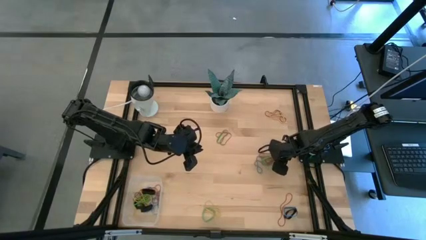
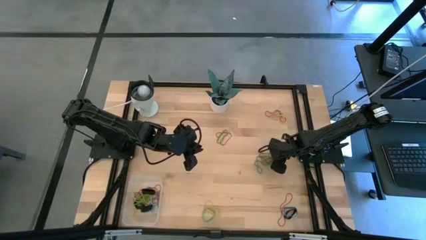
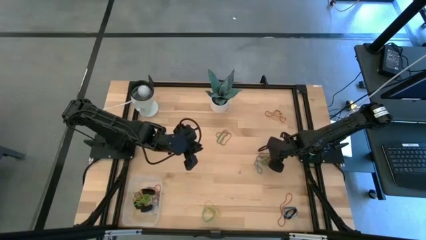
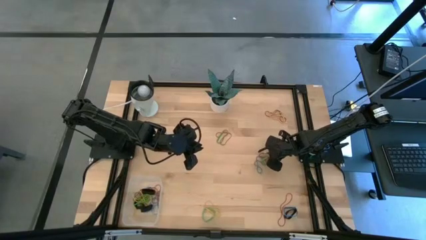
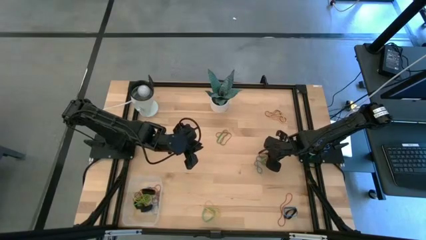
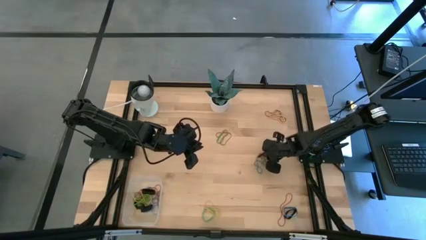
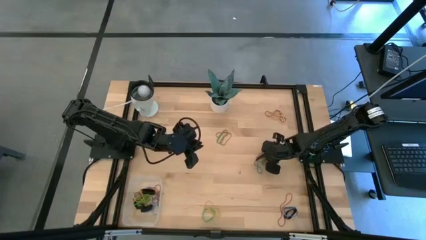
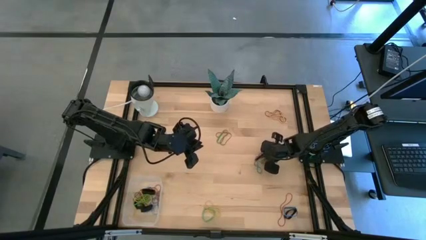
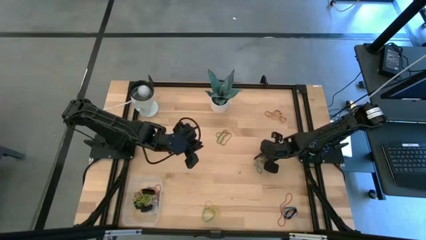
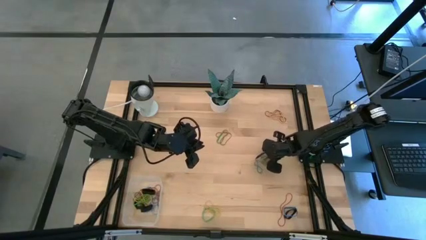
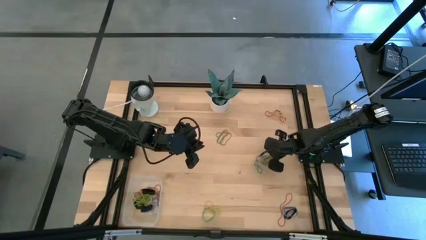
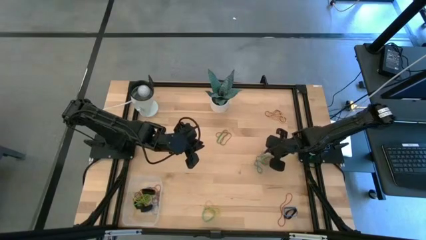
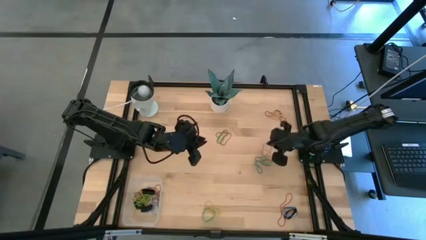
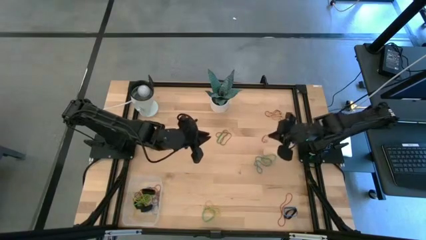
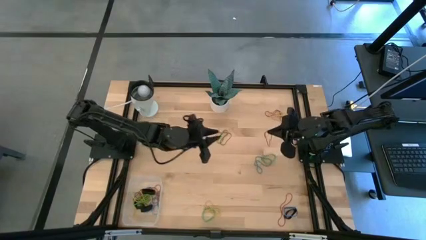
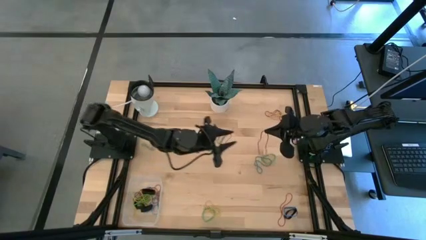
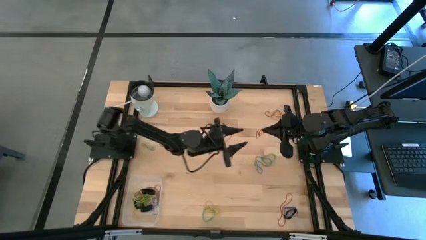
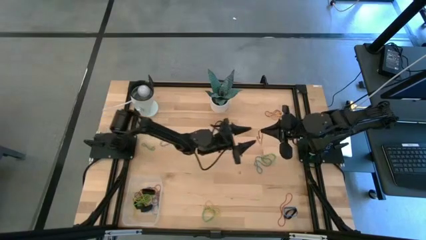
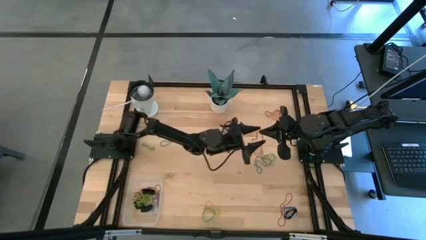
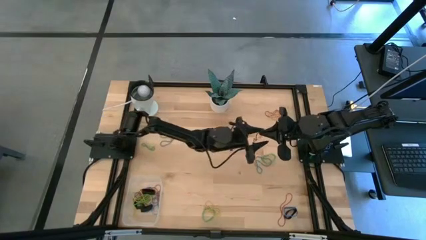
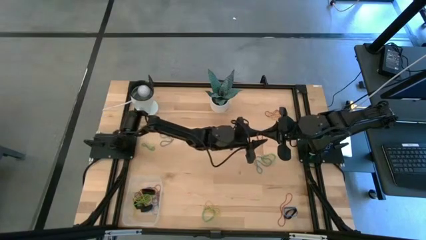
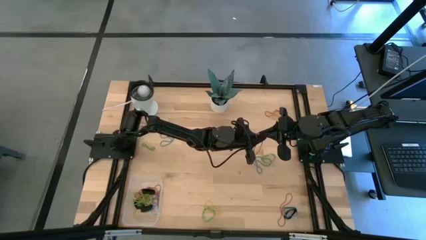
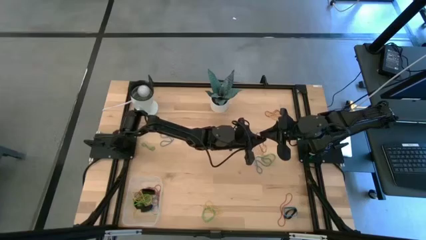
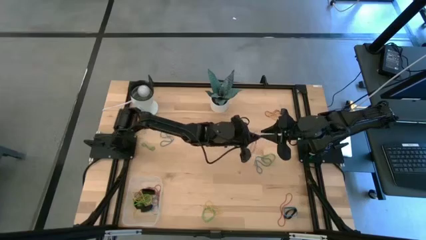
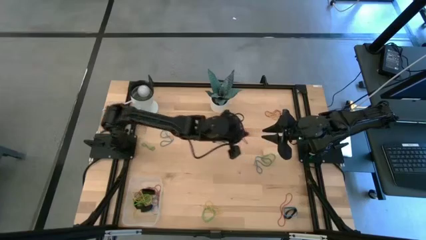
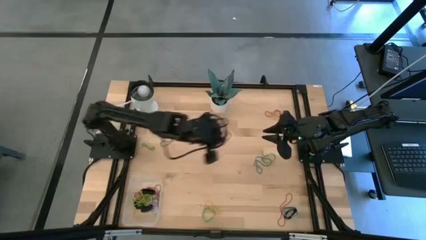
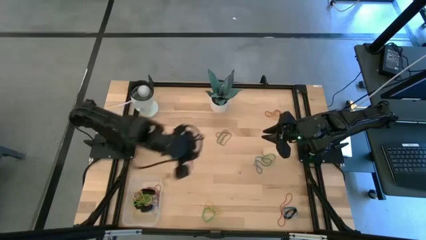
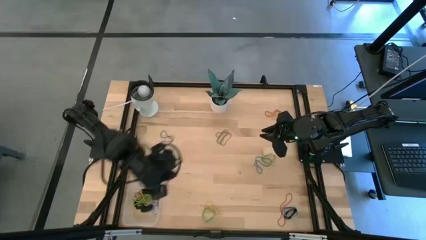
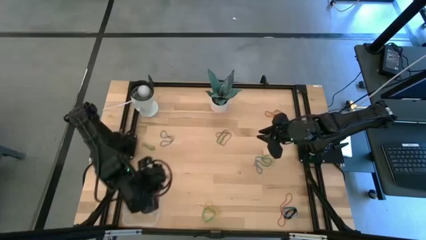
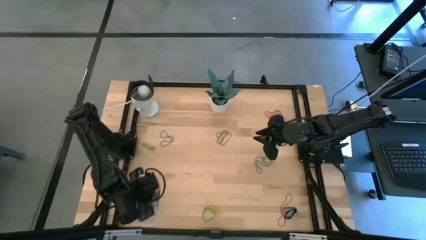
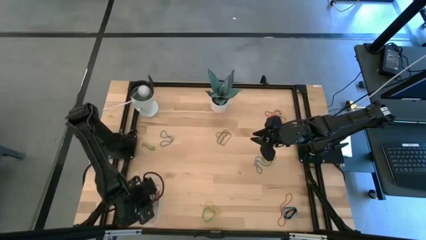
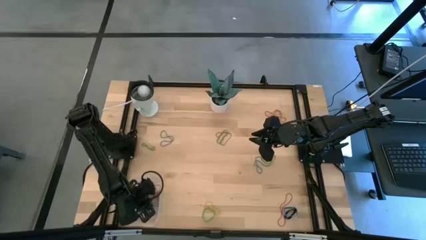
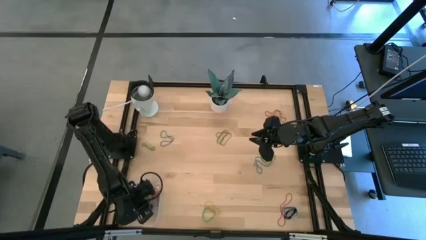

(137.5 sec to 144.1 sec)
Task: Pick and place rubber bands into bin
Put the red rubber band into the transparent bin

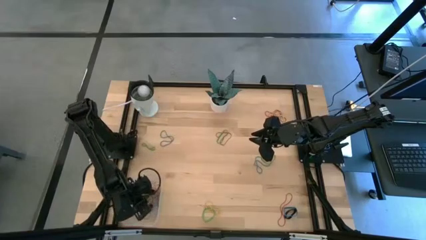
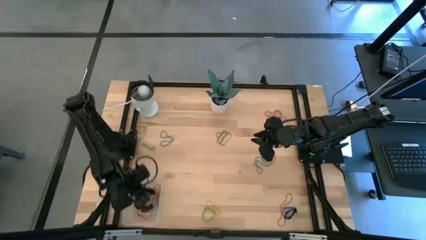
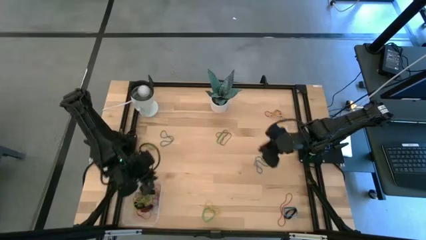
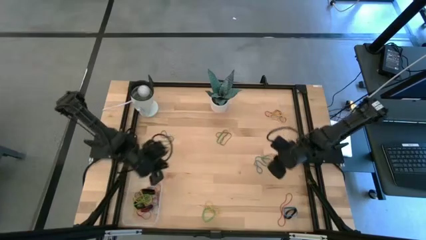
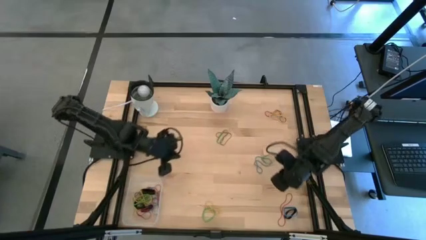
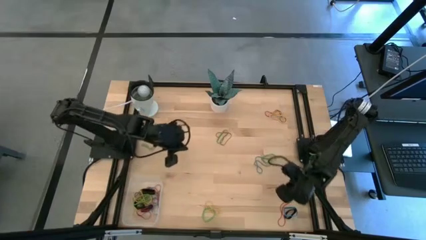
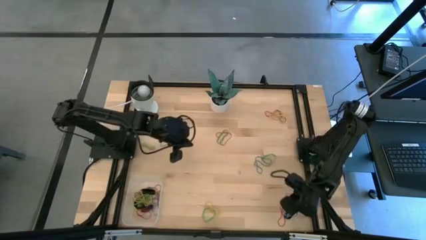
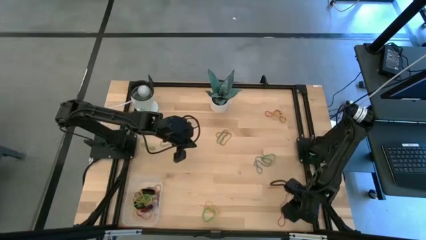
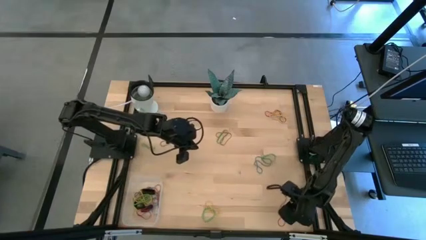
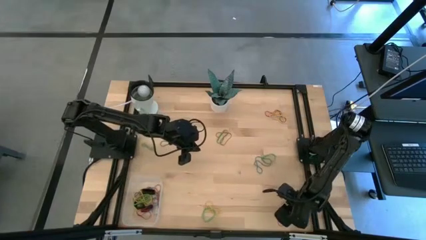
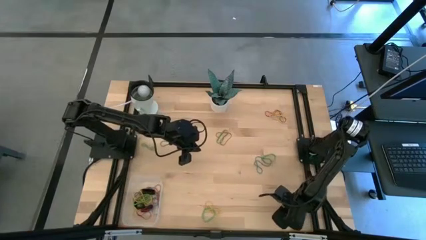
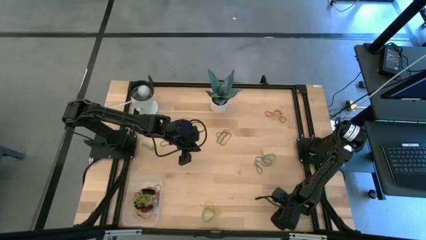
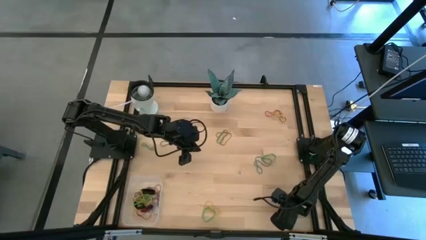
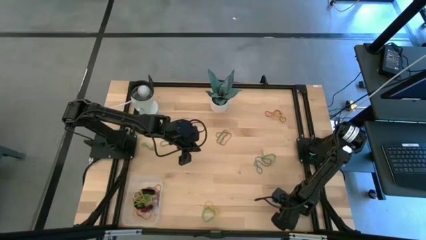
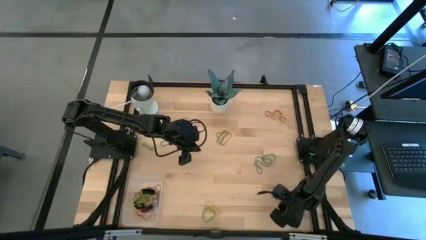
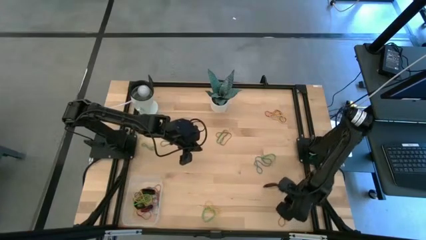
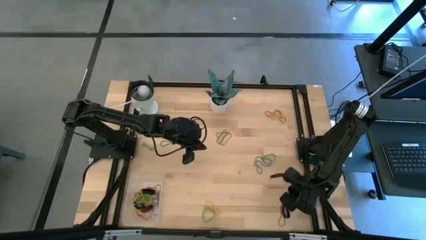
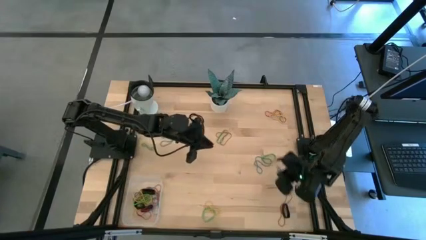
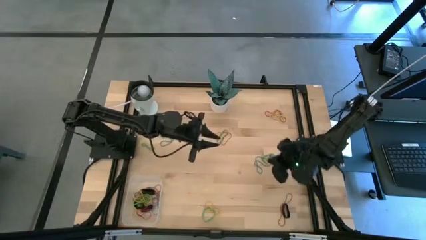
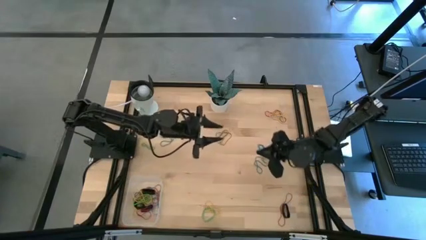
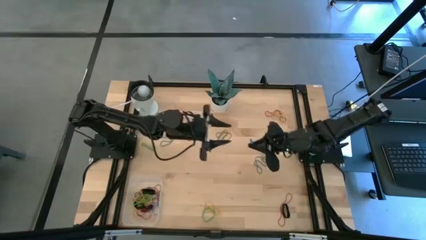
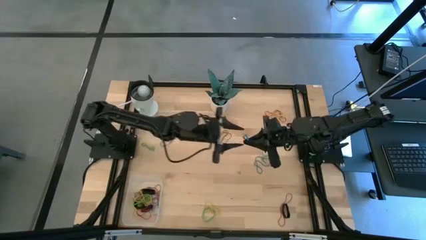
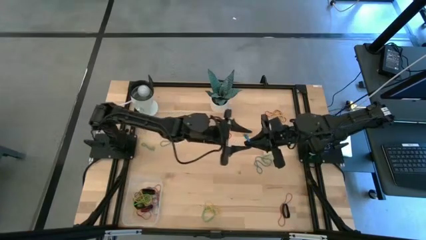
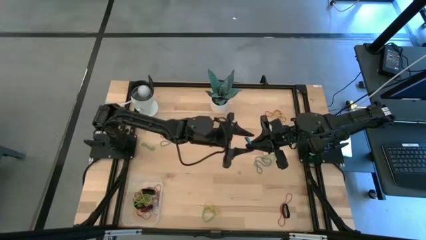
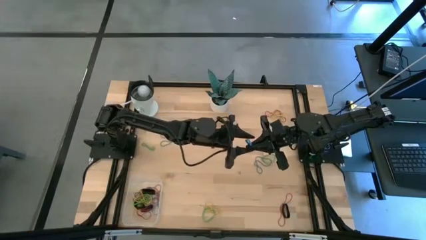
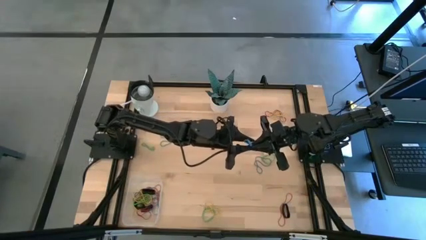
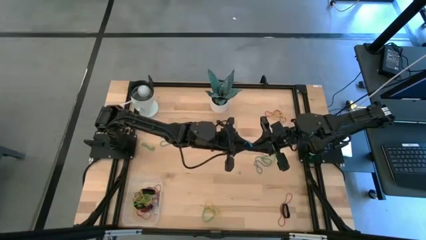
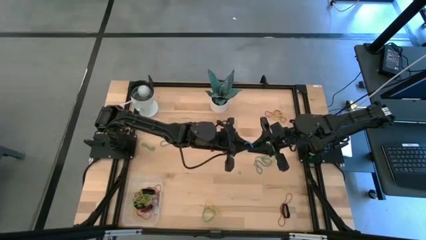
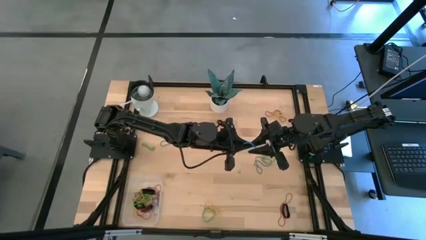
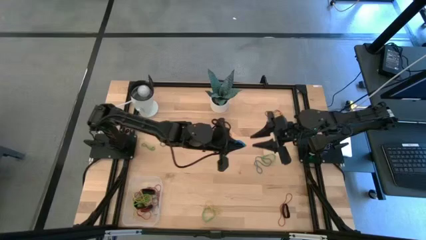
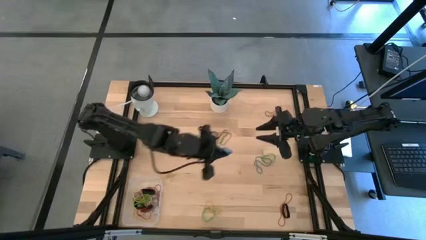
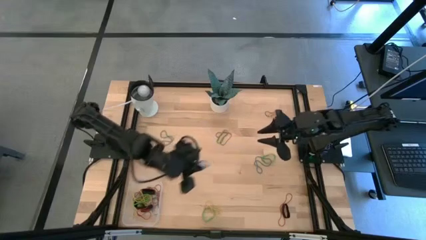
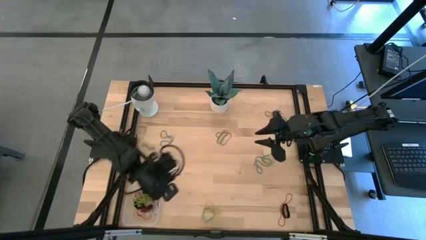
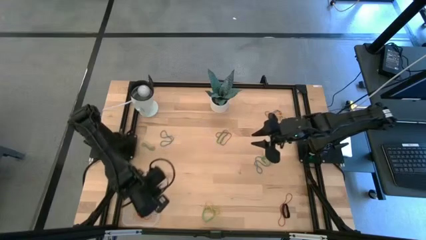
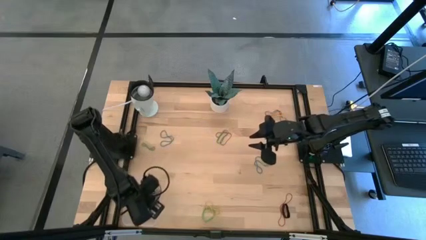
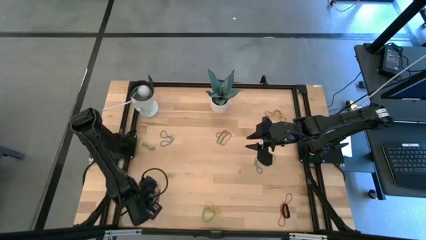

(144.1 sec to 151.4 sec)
Put the blue rubber band into the transparent bin

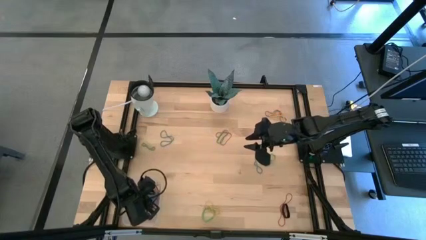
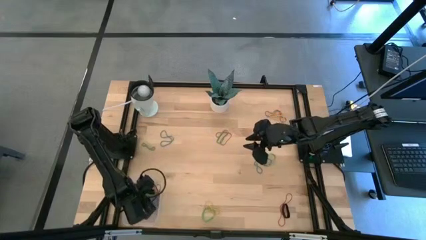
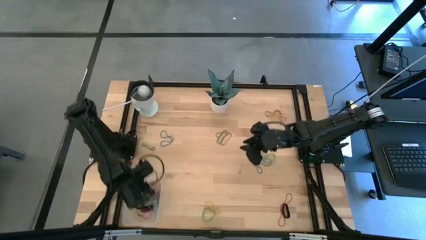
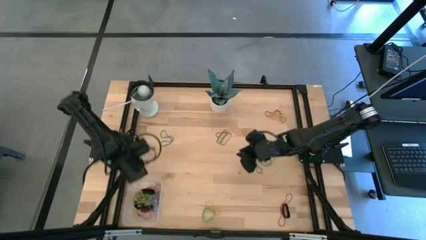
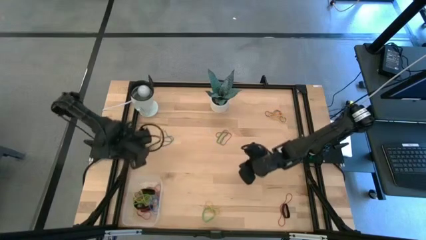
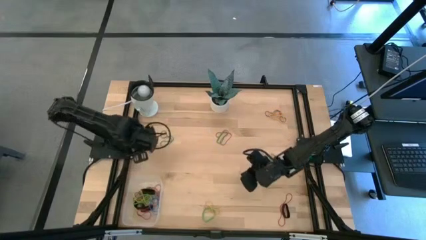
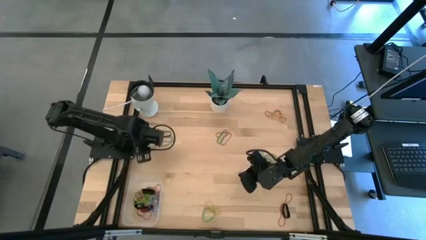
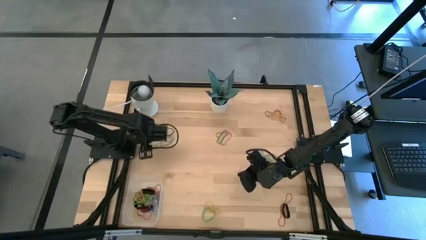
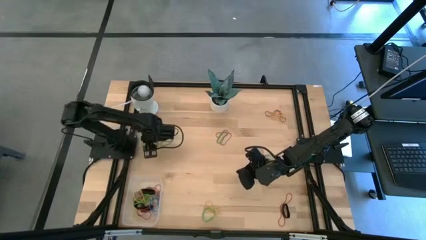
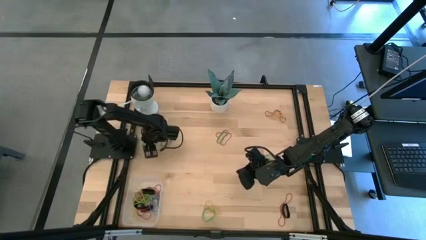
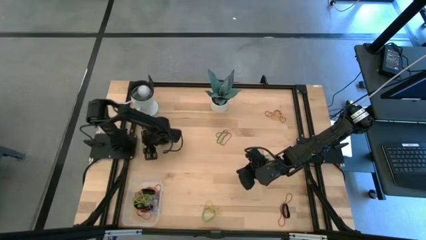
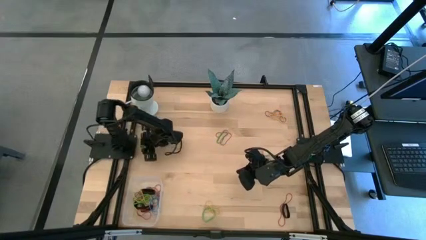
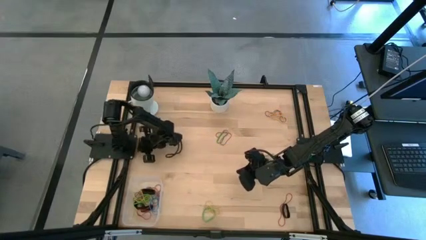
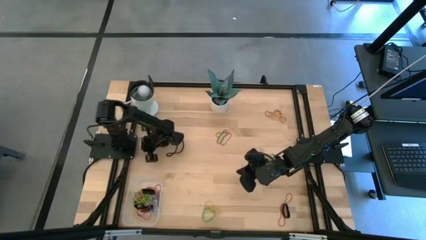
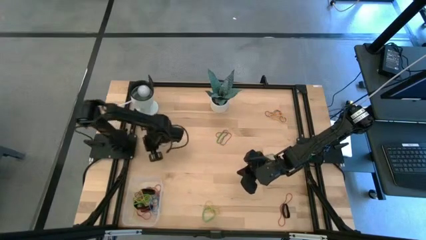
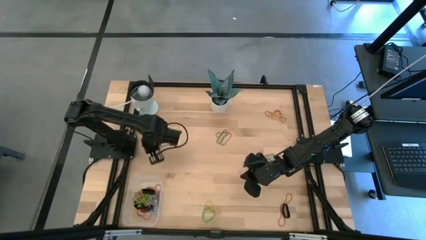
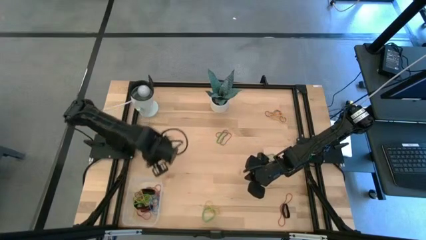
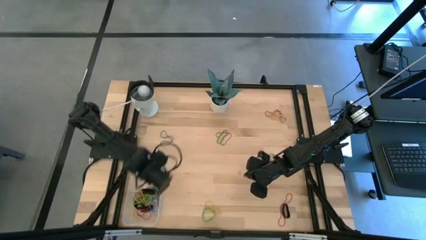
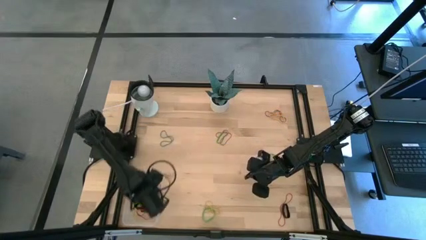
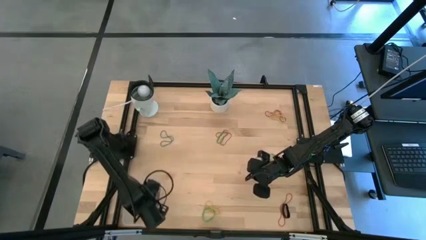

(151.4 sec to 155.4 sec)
Put the green rubber band into the transparent bin
